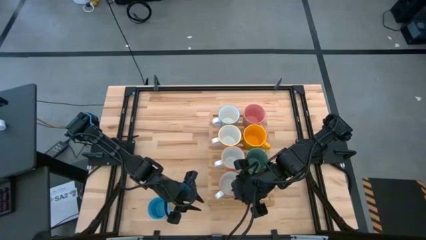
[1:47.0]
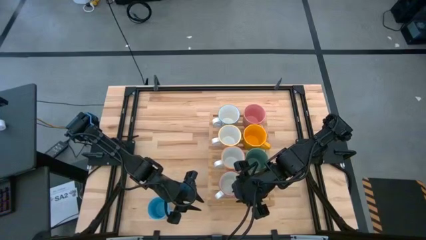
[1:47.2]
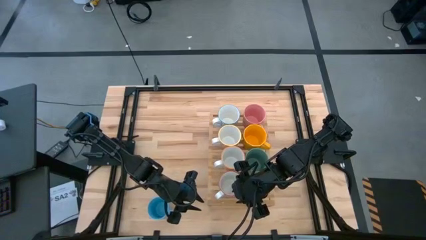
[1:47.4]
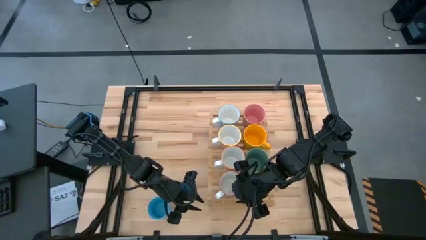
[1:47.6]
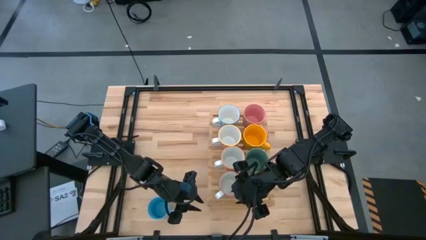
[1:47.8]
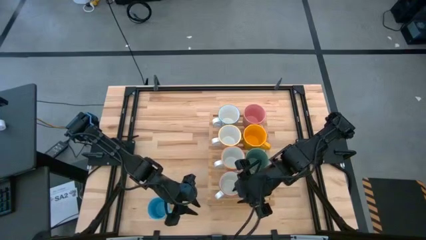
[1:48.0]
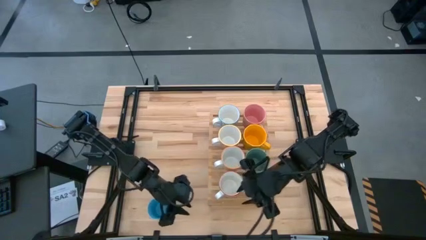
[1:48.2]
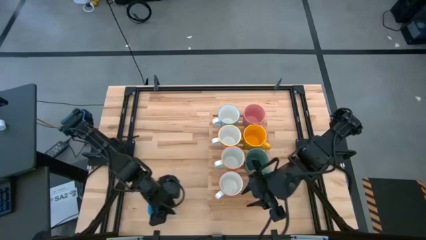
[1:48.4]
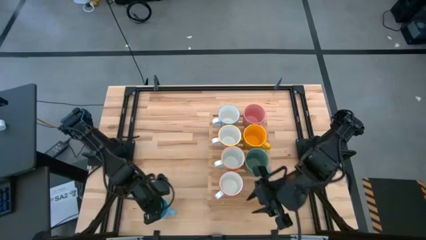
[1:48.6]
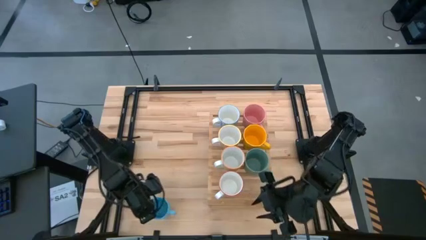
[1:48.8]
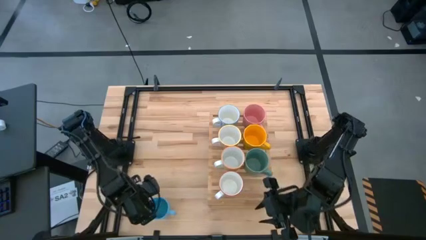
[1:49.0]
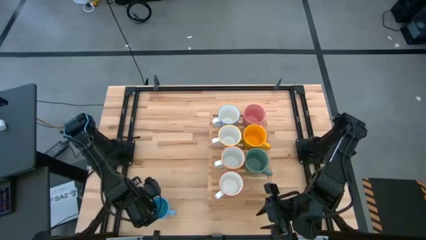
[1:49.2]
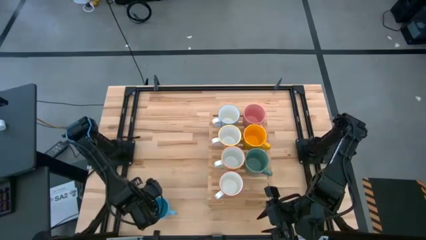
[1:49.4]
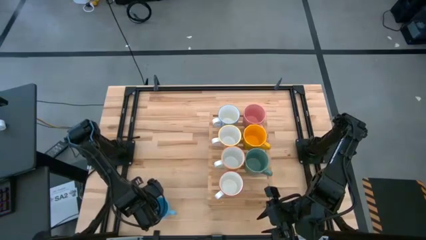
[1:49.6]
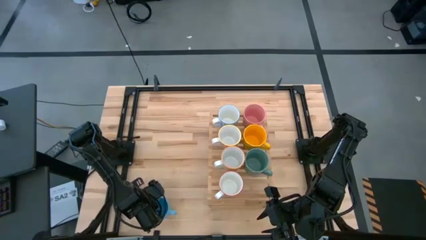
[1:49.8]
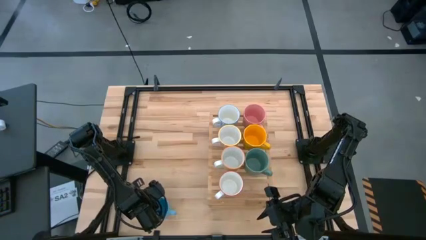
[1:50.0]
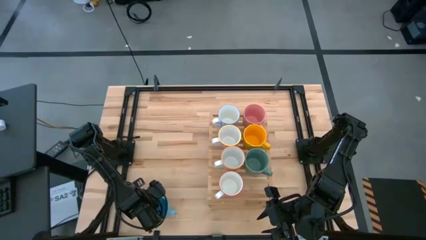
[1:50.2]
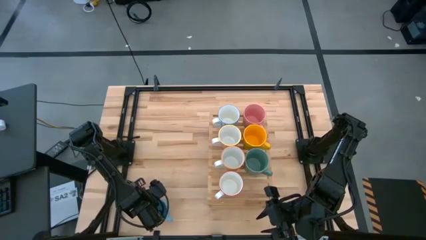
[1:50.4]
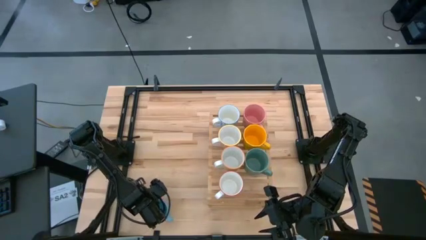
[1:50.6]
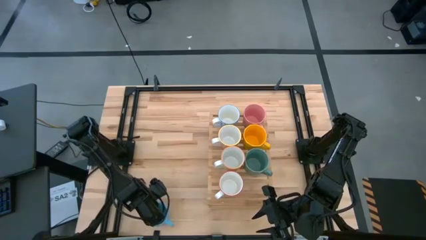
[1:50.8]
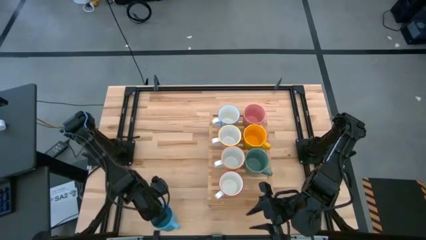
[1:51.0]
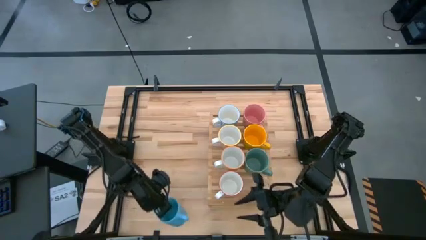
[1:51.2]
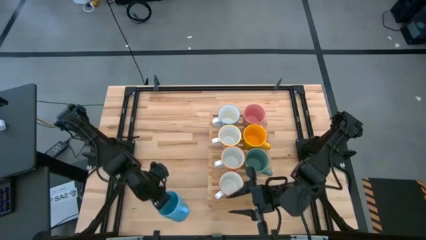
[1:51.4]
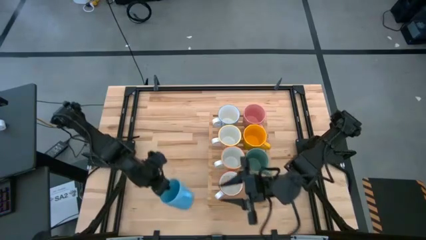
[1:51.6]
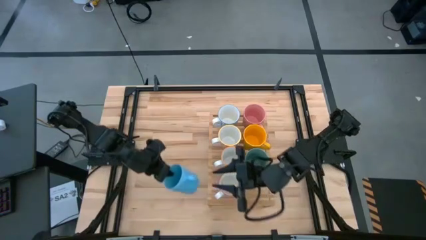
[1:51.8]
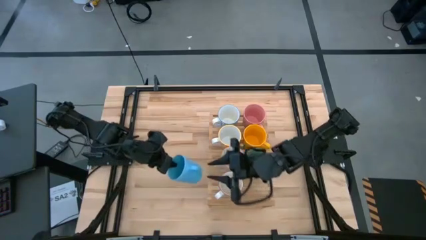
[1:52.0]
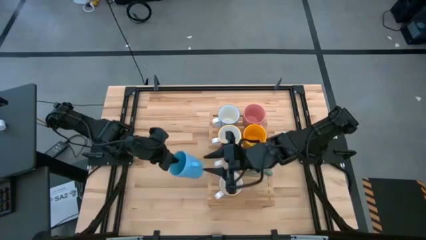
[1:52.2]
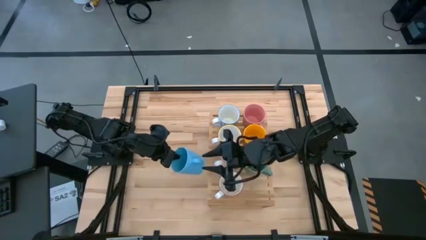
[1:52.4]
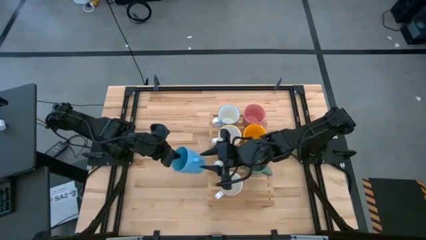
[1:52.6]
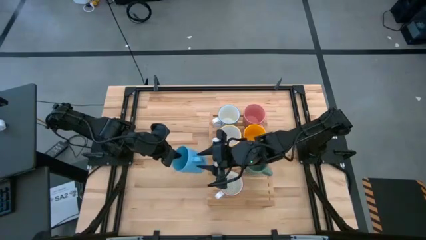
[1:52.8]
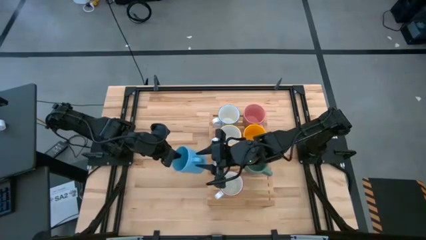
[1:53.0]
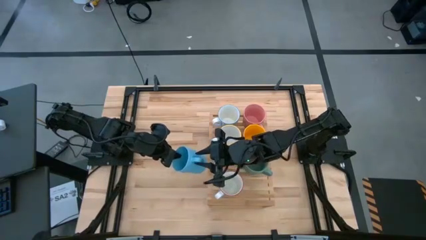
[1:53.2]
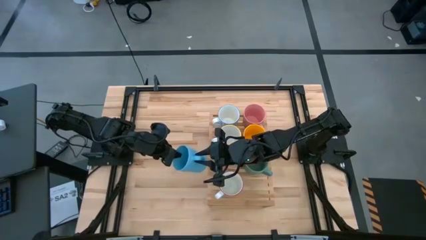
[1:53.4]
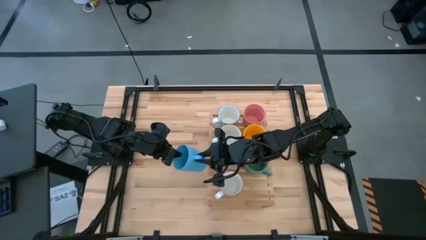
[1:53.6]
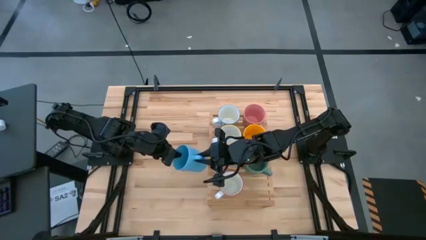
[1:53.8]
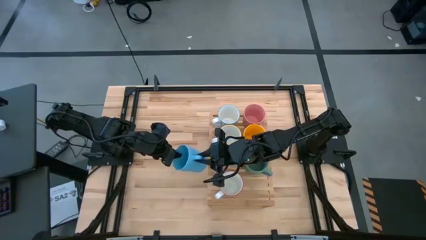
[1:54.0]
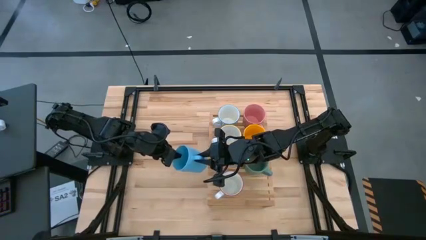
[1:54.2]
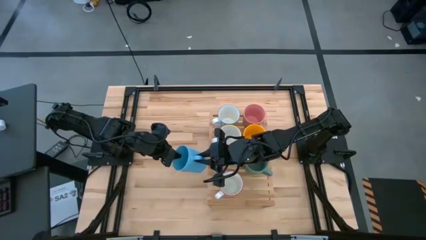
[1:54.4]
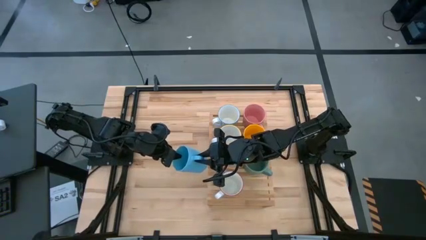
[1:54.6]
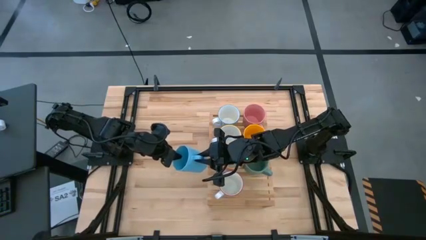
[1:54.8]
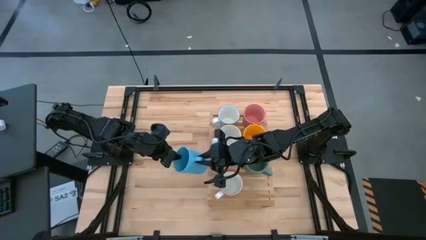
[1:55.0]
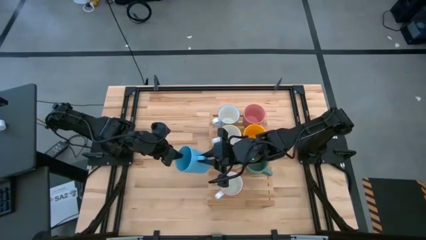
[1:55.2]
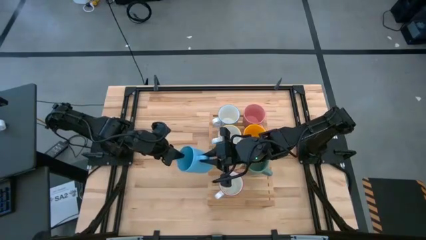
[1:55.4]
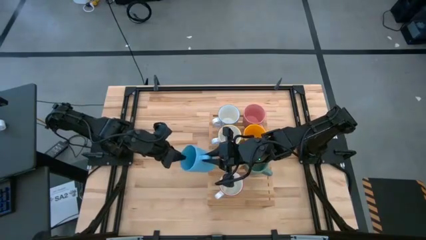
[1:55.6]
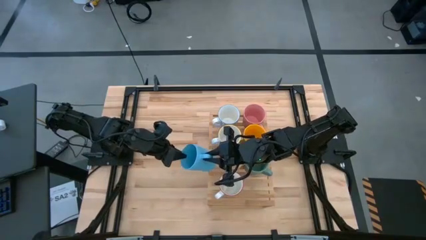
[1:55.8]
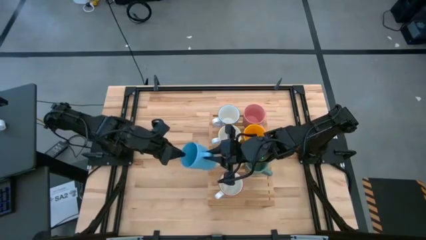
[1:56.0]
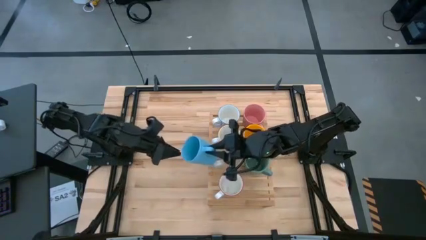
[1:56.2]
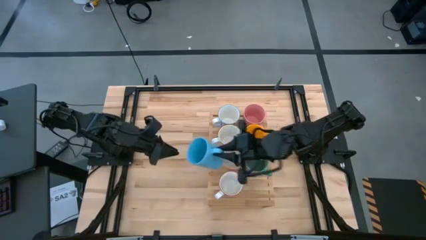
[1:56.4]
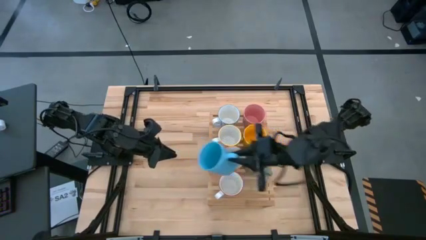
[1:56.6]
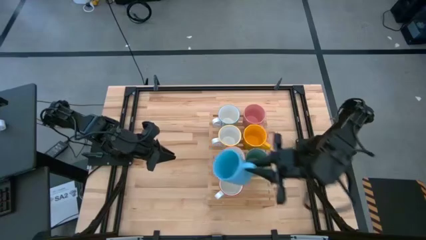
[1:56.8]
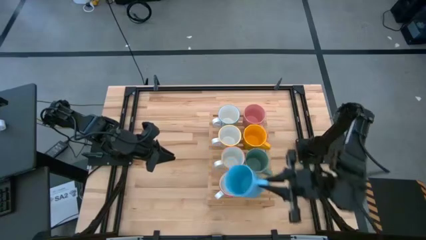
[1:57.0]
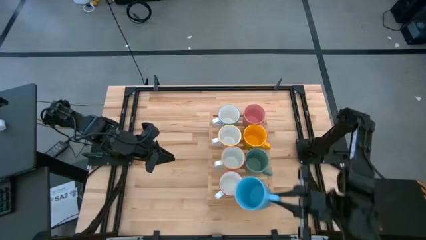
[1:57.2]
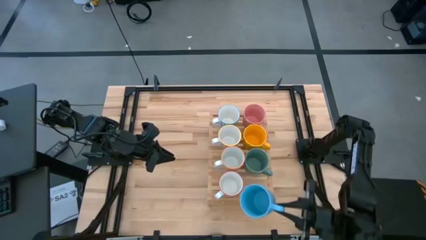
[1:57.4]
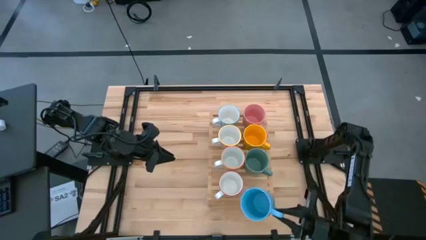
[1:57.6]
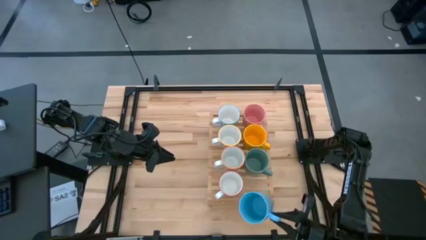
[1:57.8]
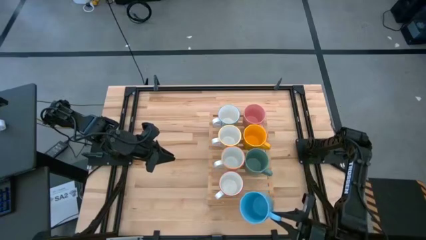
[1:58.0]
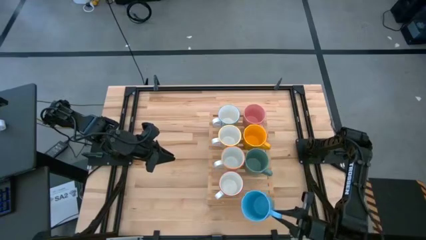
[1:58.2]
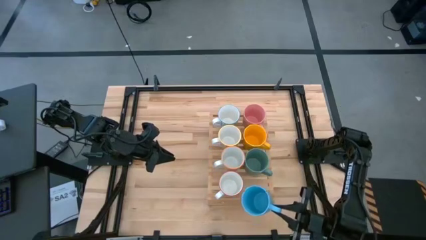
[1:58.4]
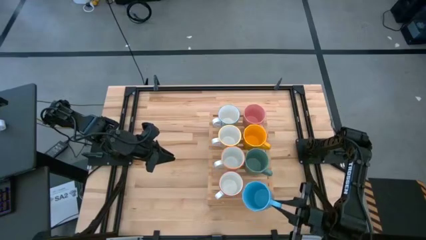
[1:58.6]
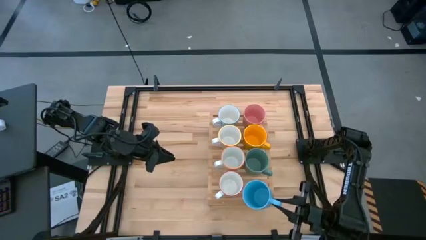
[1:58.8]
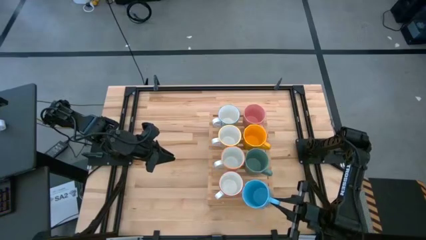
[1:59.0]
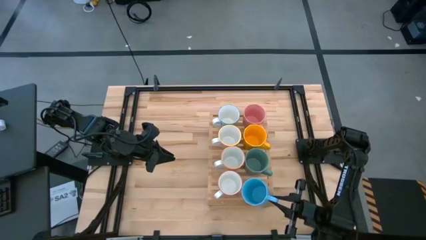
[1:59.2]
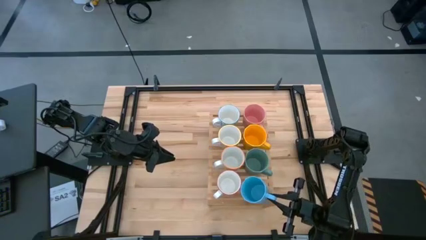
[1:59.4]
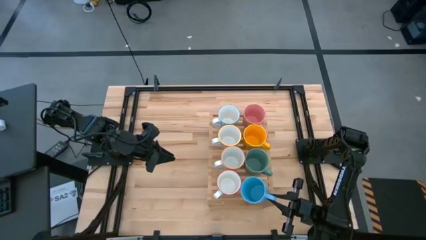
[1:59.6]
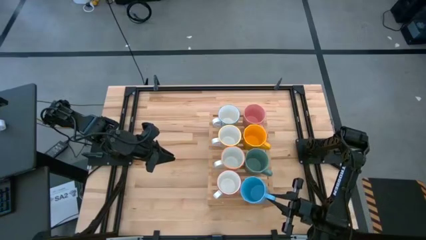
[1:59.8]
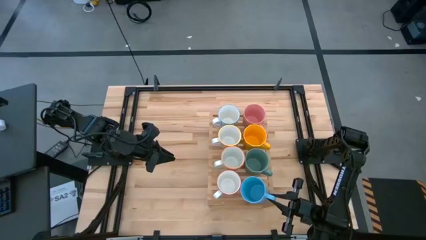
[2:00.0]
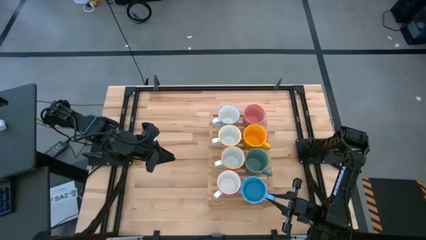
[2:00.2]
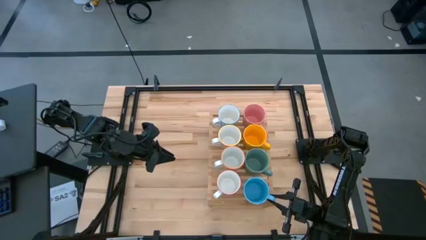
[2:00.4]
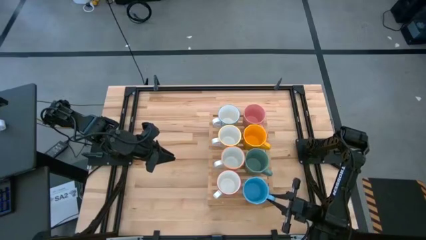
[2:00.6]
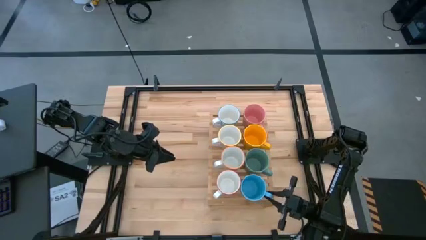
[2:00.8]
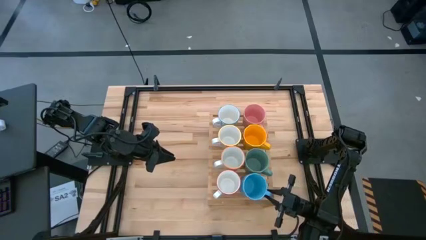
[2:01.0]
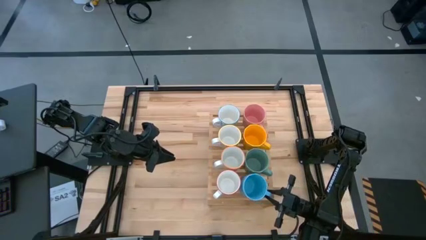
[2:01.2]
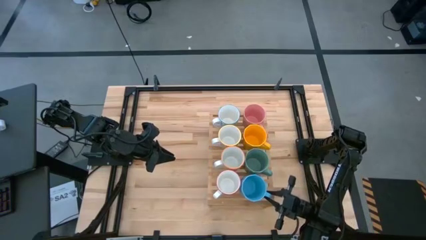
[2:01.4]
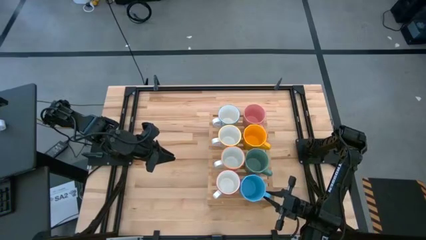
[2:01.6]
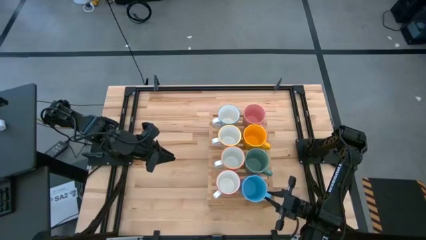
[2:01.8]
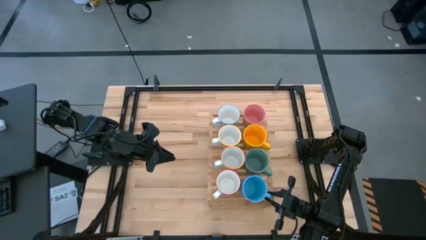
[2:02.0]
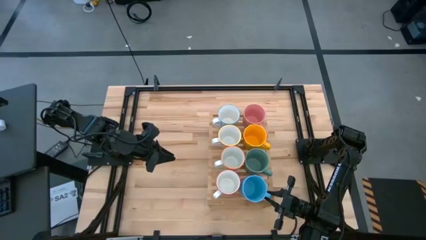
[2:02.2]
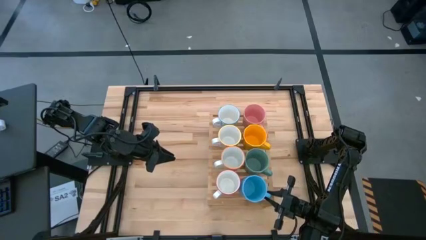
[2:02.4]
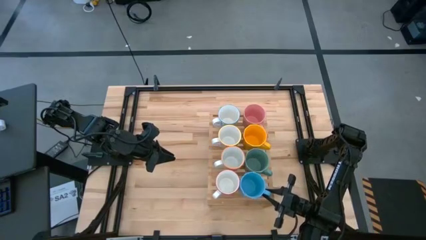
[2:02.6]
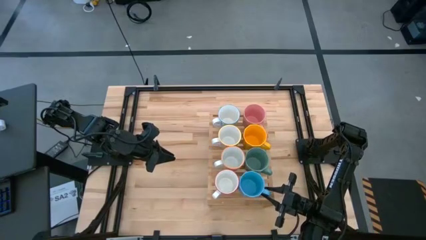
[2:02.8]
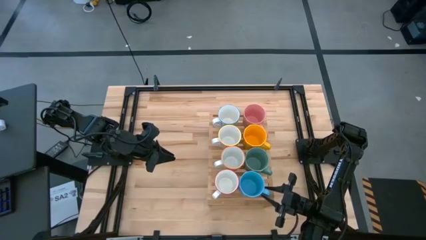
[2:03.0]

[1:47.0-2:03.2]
Task: Place coffee mugs
Put the blue mug on the shelf
